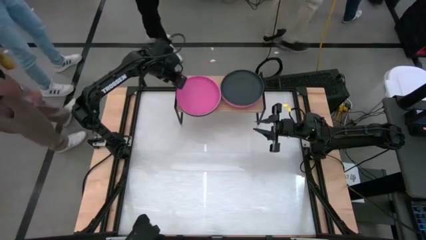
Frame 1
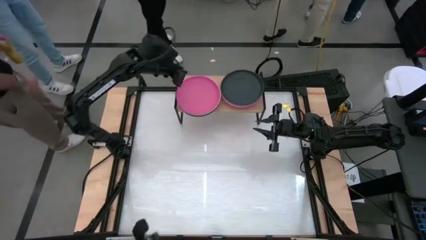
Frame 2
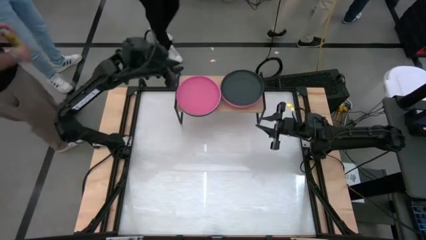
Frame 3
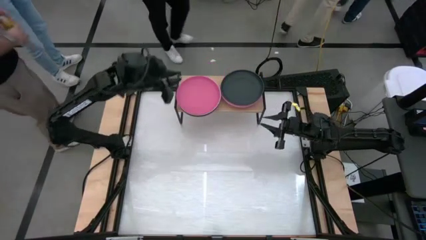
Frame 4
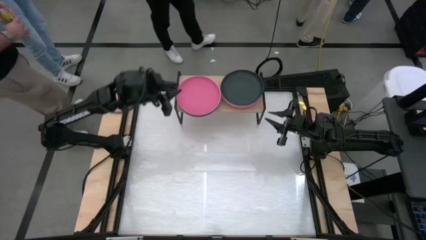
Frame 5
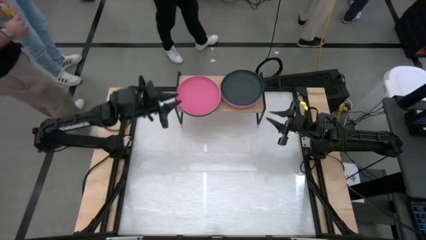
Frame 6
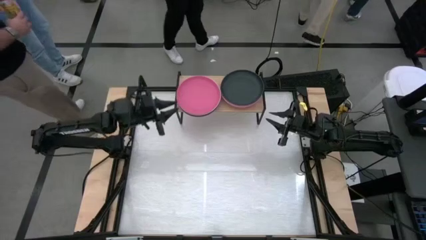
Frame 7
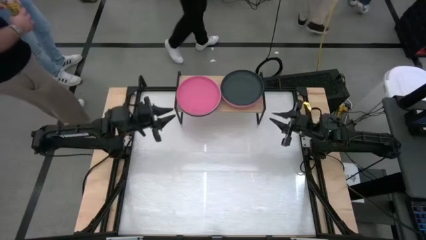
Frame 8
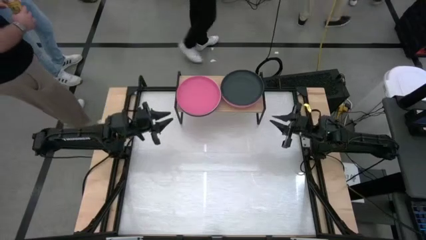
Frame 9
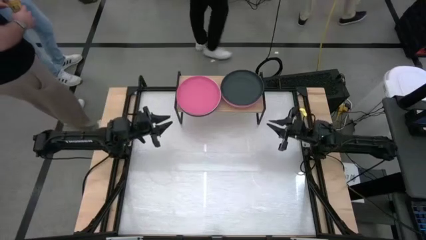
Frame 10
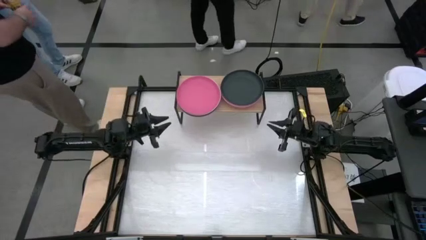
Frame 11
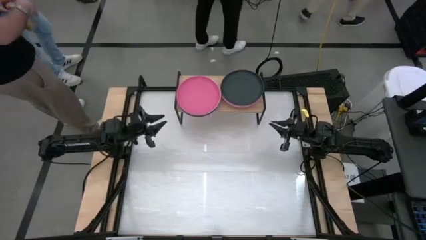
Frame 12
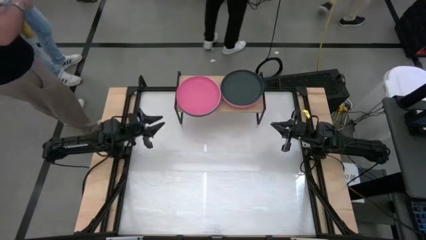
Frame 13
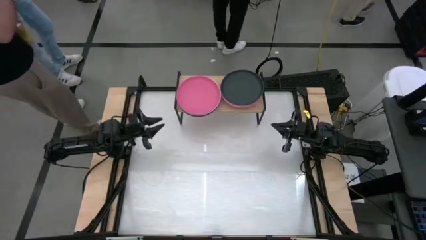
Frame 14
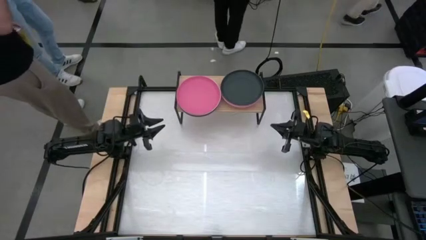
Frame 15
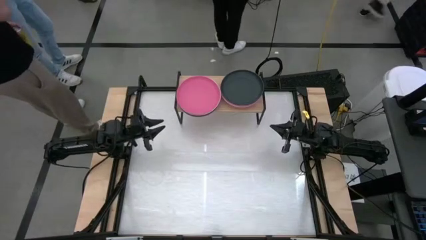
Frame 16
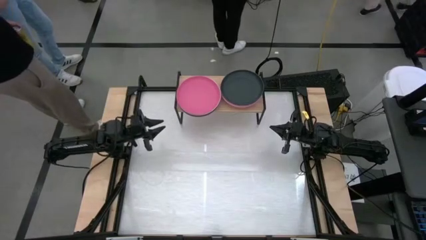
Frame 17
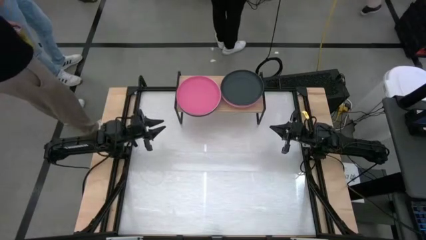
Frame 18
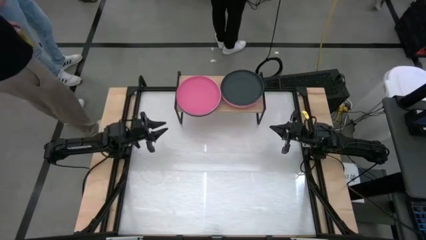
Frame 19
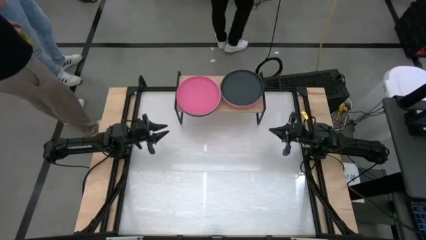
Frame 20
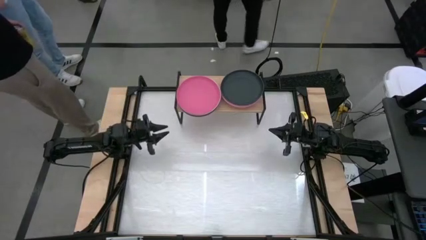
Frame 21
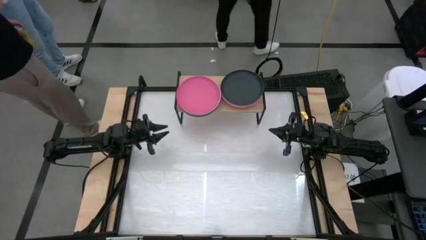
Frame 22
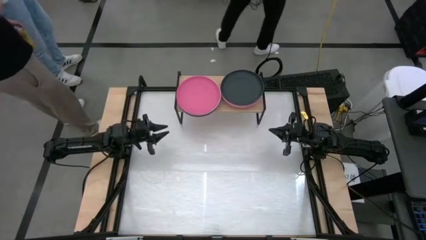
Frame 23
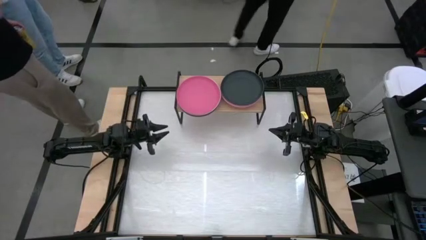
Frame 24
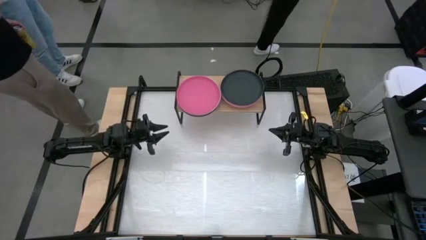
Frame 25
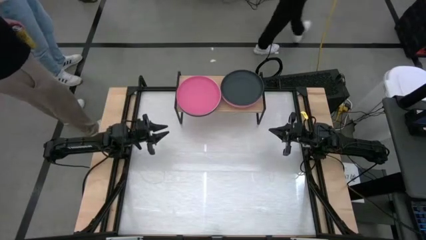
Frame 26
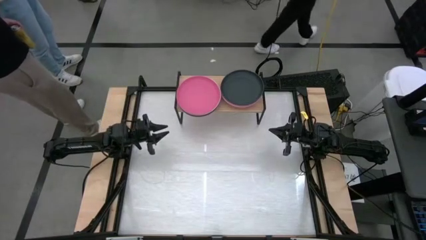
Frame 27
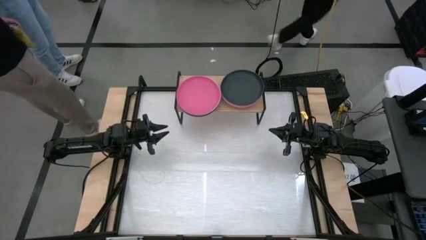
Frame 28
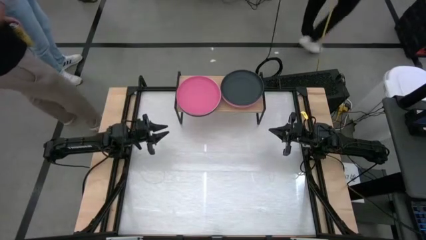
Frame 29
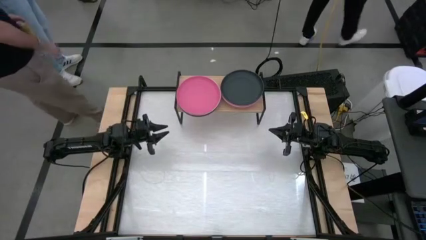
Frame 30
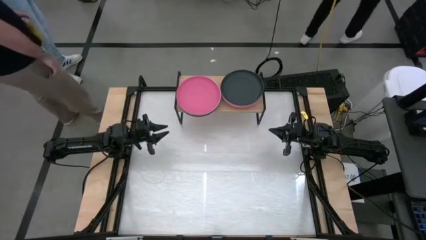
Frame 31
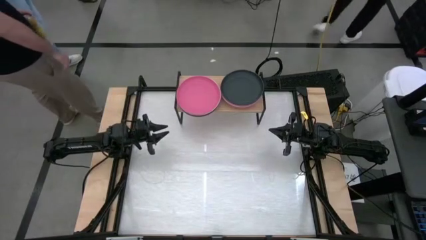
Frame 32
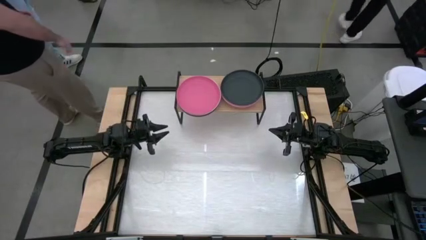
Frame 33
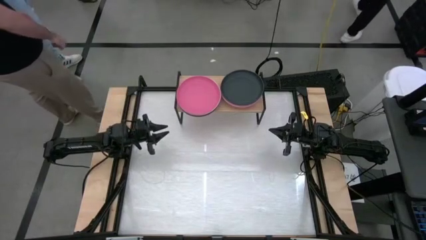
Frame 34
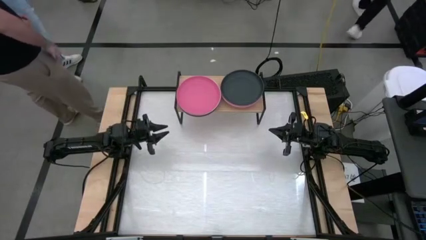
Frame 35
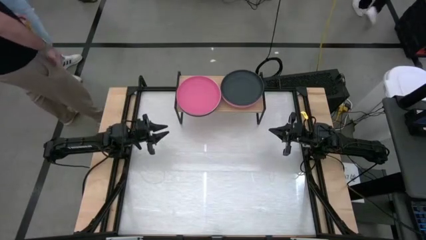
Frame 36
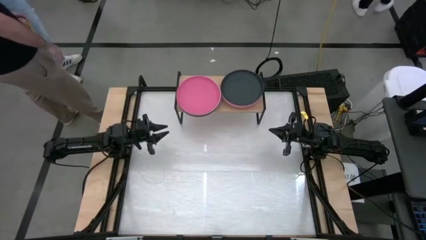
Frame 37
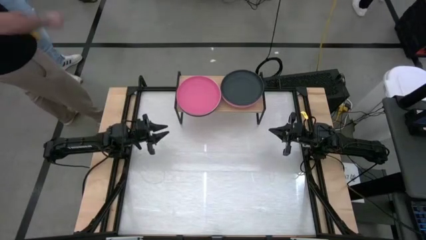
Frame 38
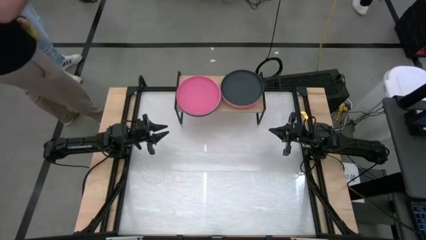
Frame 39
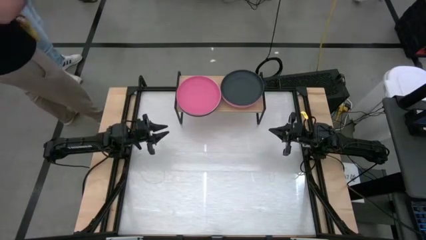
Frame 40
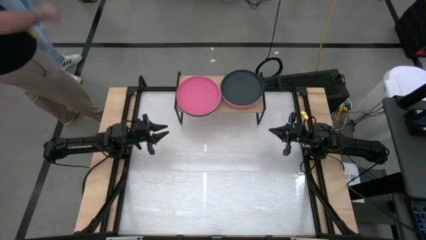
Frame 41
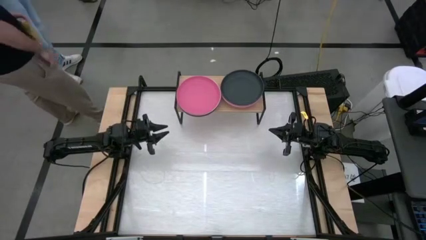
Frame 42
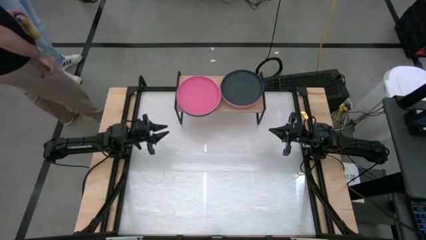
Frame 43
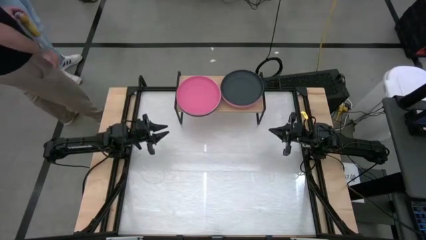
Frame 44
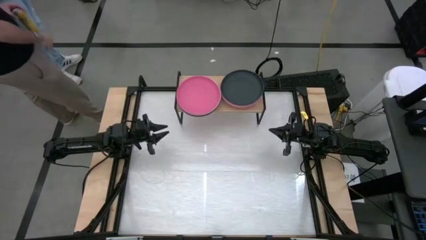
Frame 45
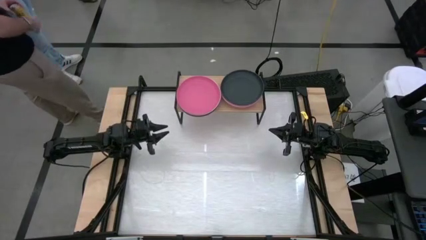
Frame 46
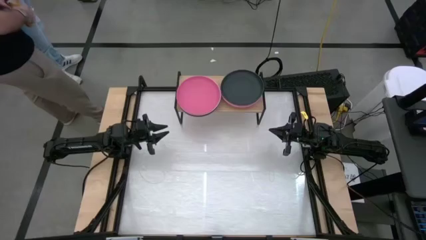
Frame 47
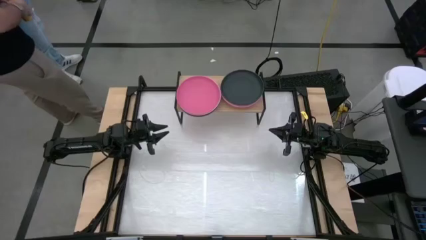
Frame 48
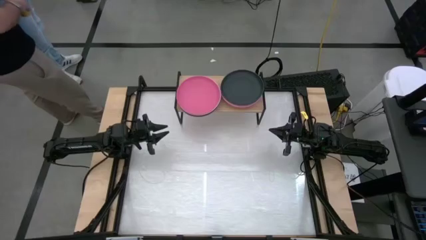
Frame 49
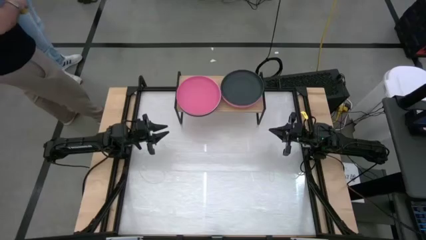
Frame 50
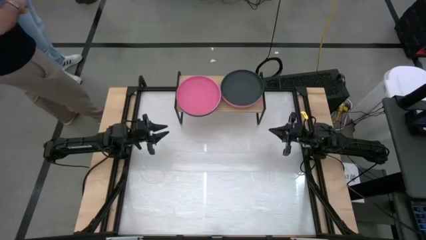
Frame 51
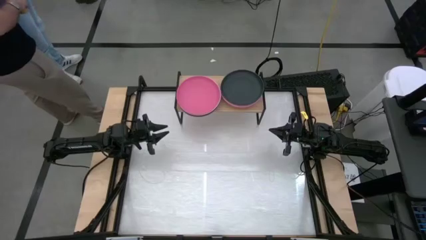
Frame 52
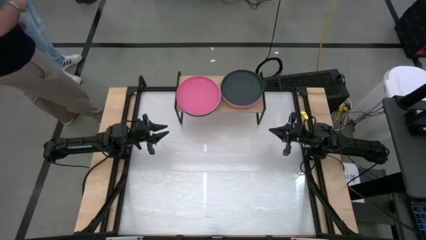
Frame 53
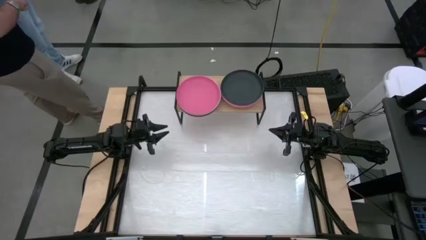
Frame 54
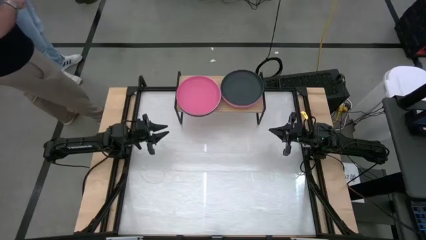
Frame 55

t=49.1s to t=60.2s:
Task: Place and stack plates onto a shelf
Return to Home Position

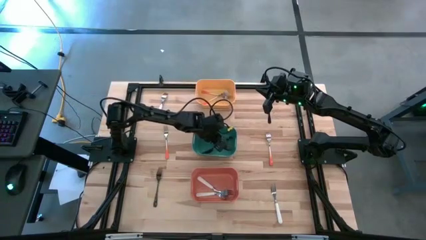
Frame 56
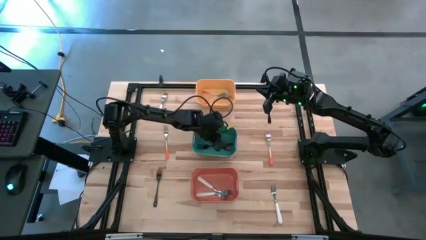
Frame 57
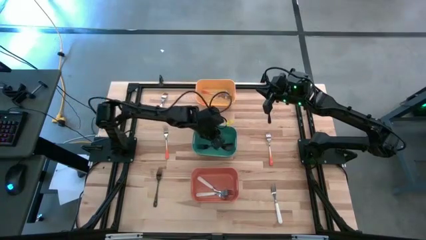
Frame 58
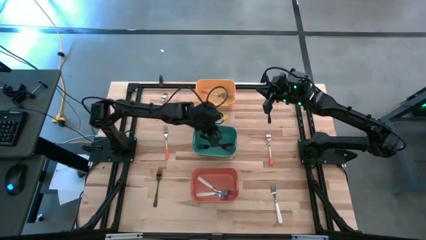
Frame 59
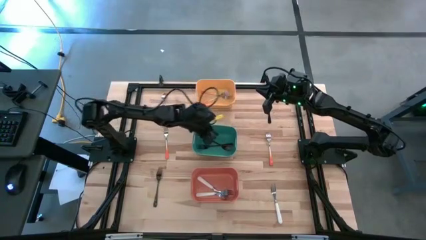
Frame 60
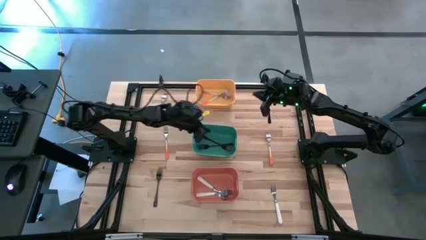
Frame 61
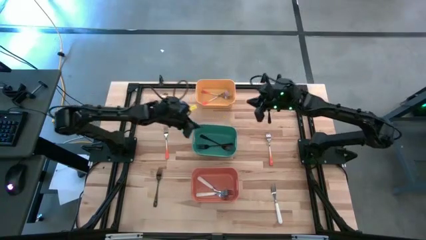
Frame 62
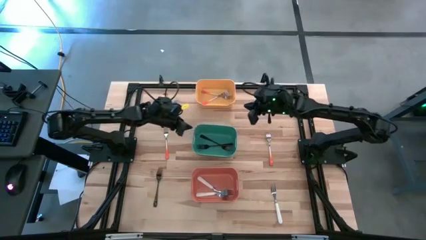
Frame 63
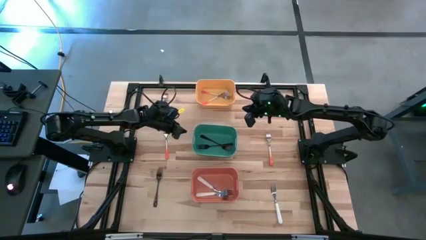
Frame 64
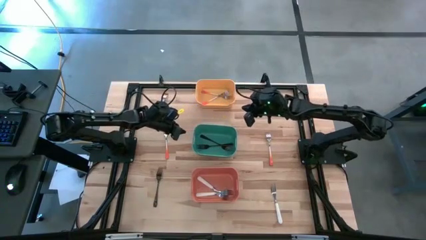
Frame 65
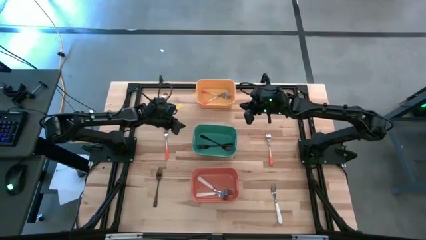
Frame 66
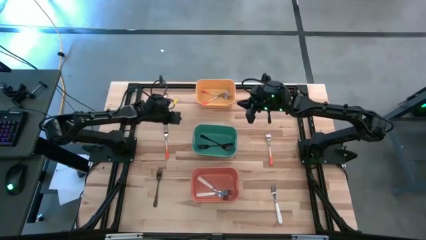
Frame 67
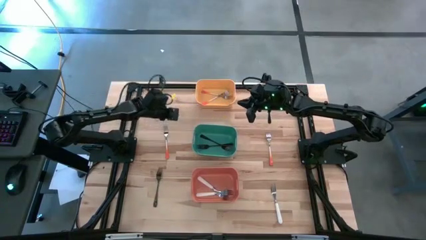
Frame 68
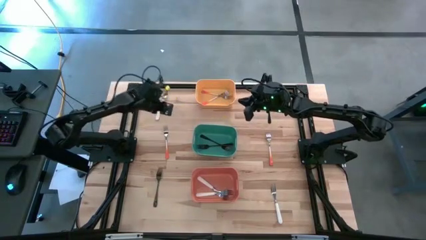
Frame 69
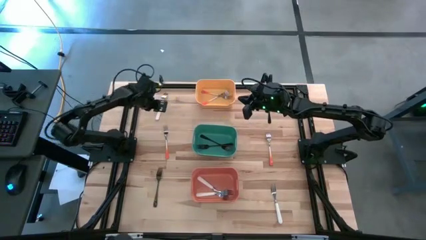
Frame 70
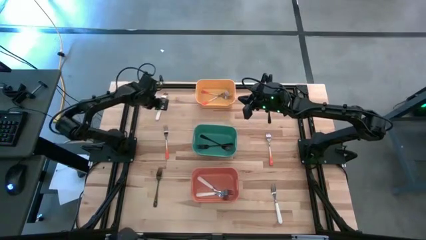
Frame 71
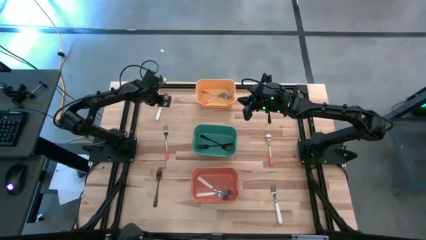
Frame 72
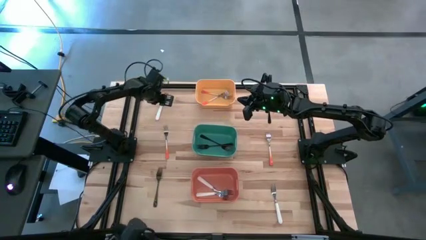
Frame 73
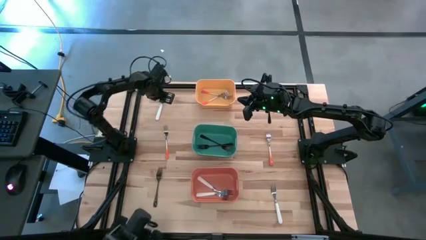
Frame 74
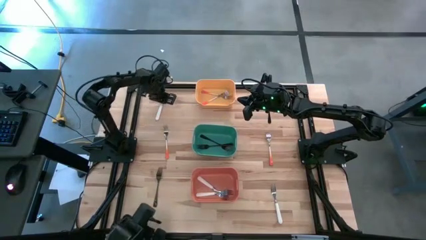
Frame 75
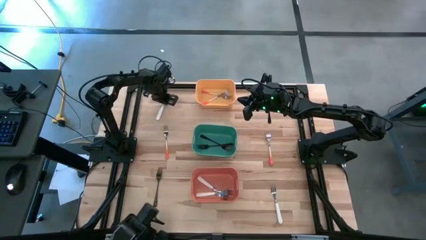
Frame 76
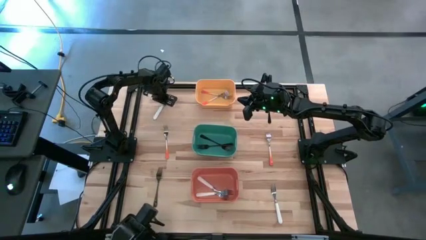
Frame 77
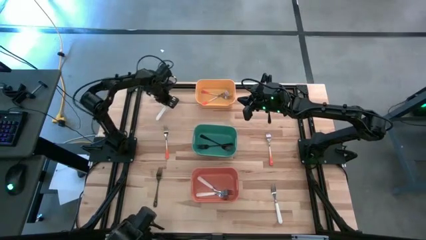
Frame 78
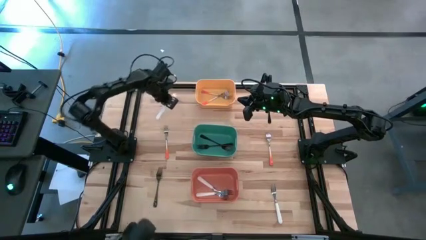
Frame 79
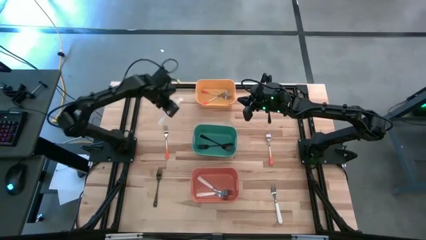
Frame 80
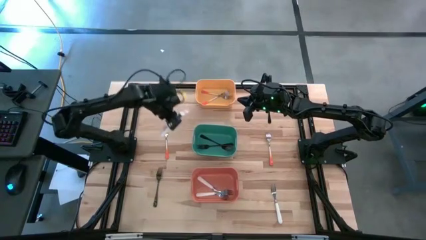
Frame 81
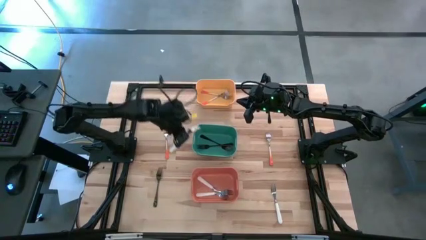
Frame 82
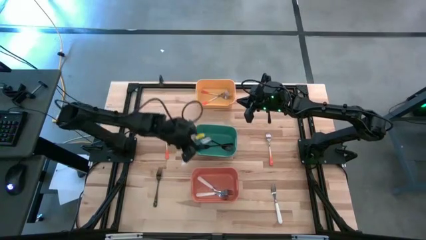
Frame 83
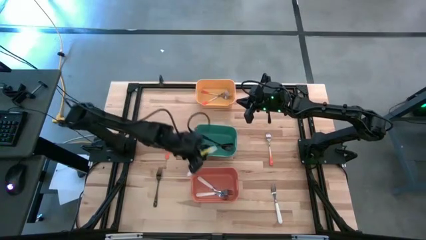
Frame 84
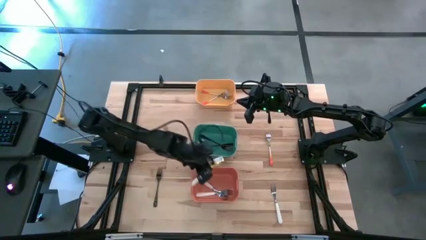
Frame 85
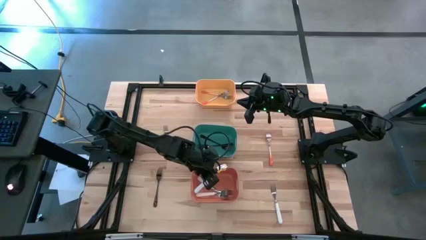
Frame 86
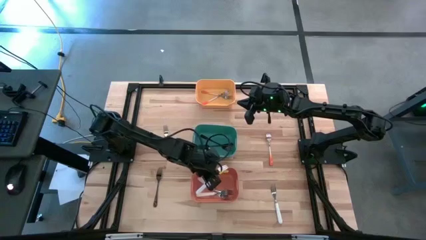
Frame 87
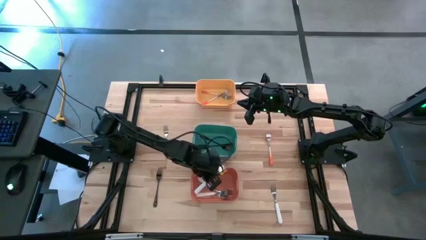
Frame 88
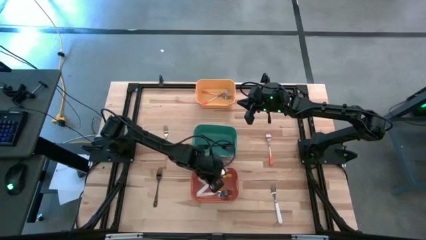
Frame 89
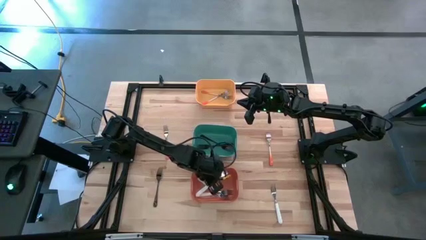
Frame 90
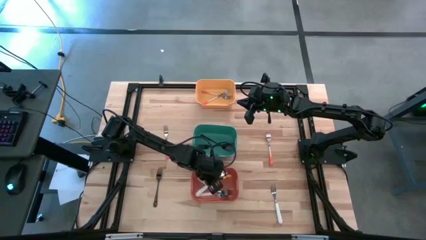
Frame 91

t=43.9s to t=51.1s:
Task: Sort silverware by color (type)
Put the white fork into the orange bin
